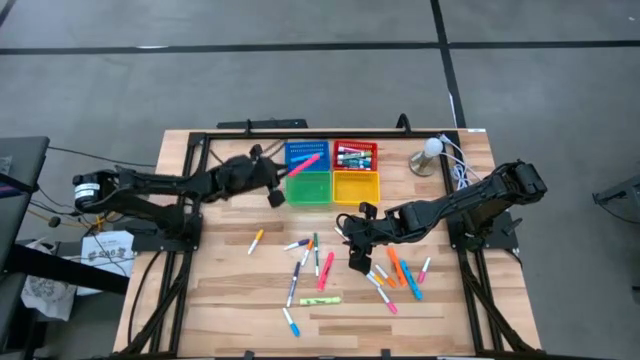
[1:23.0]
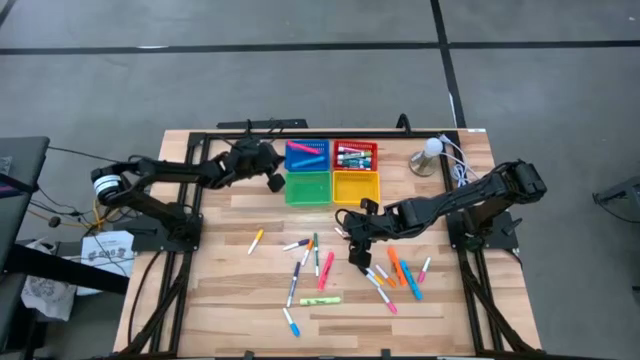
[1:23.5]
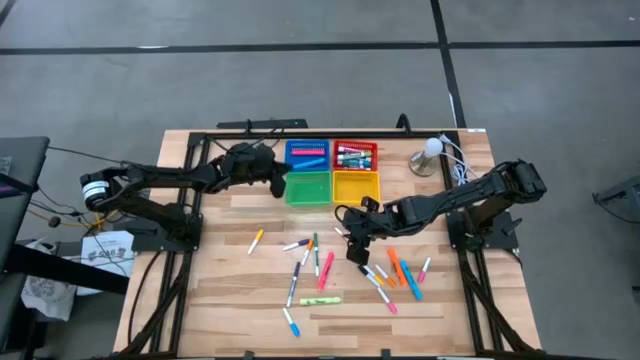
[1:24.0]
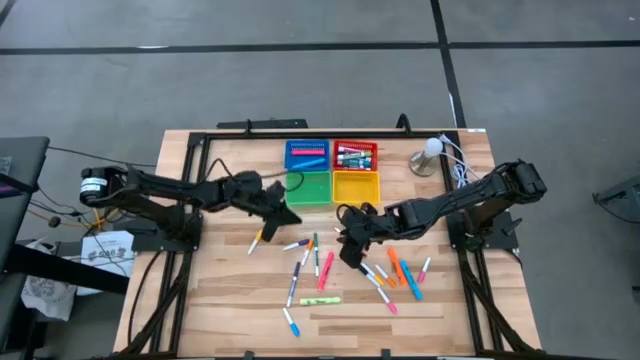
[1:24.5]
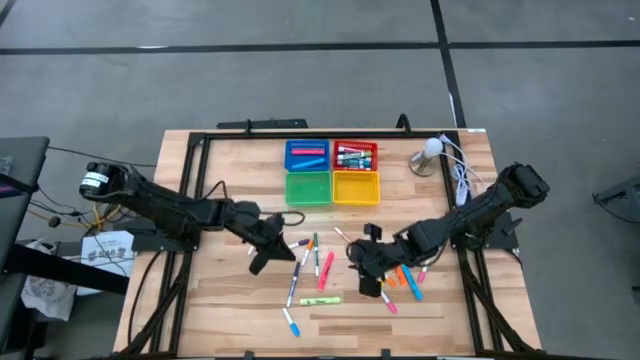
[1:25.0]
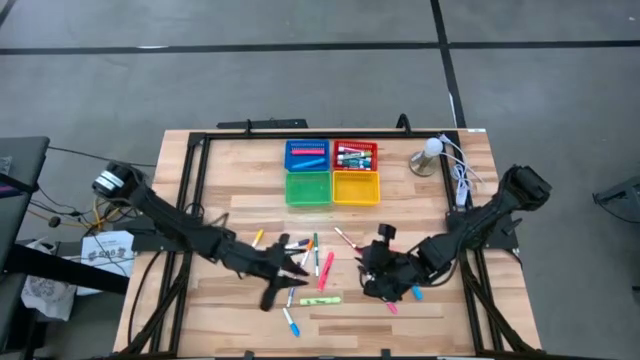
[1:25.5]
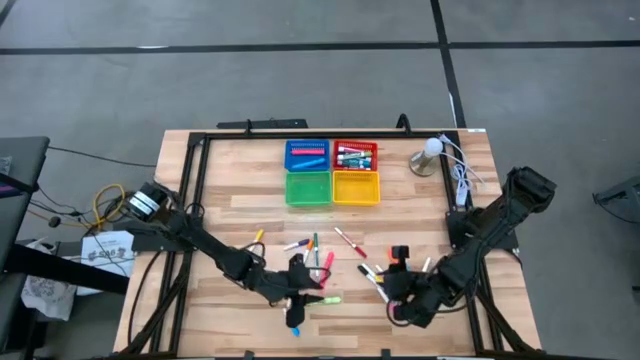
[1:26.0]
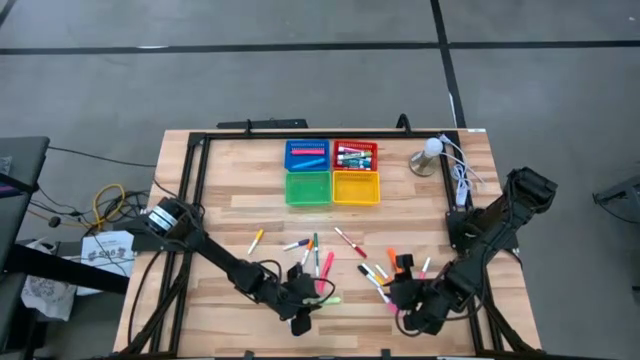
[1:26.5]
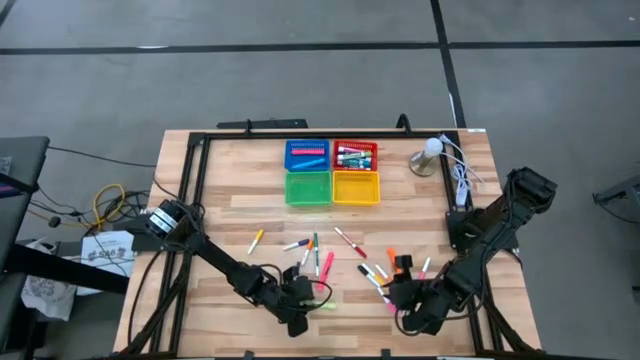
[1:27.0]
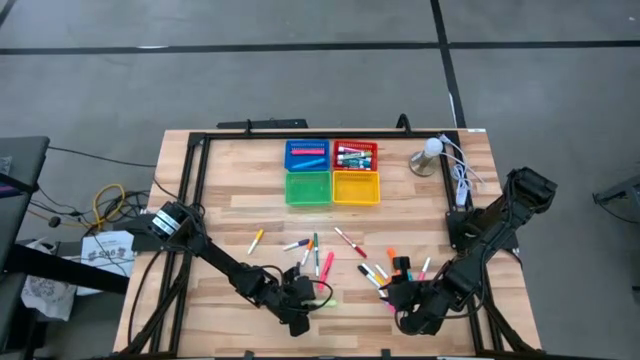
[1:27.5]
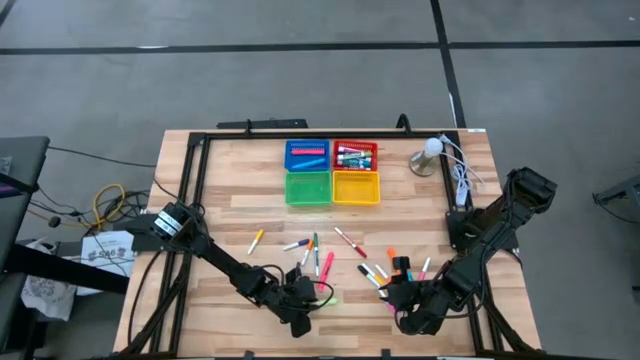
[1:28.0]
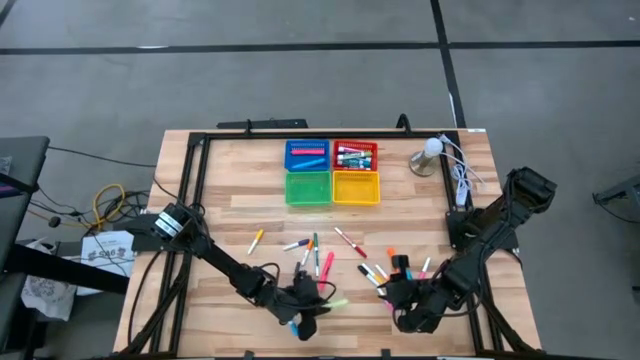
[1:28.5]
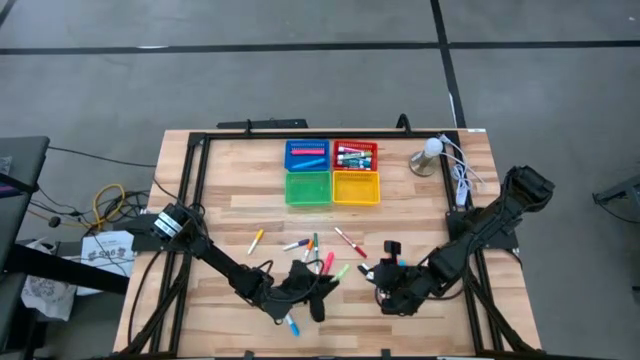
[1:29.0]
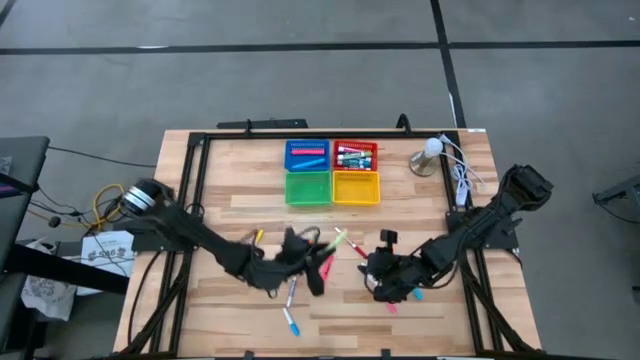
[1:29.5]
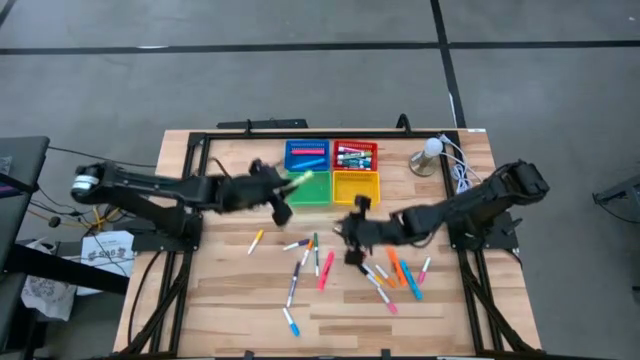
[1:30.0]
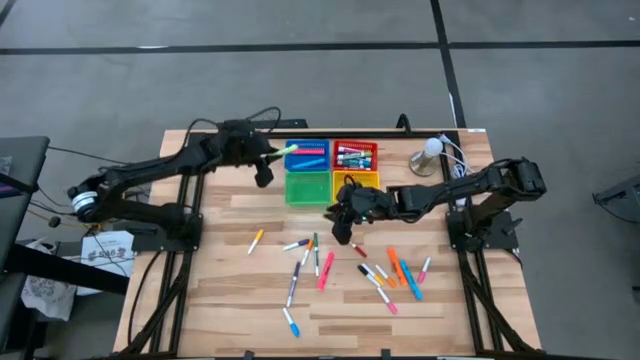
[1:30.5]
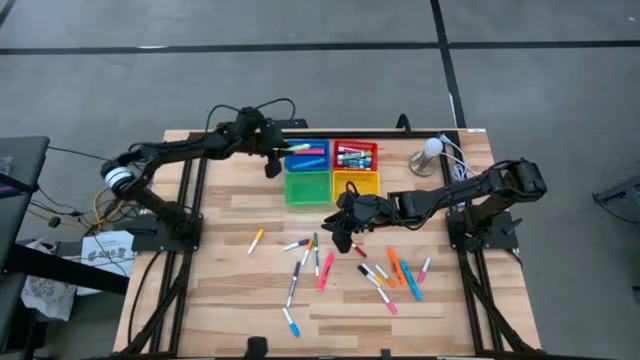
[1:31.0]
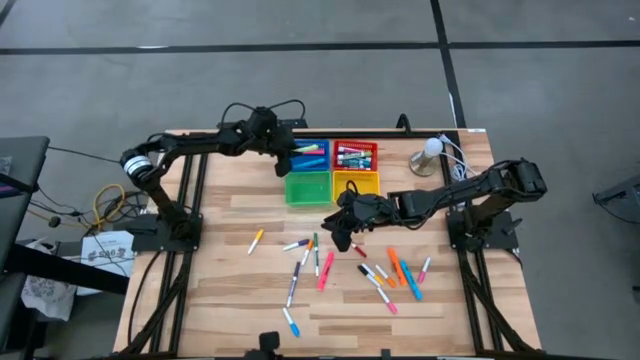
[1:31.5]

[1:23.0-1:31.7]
Task: Pick & Place Markers
Put the green highlighter into the blue bin

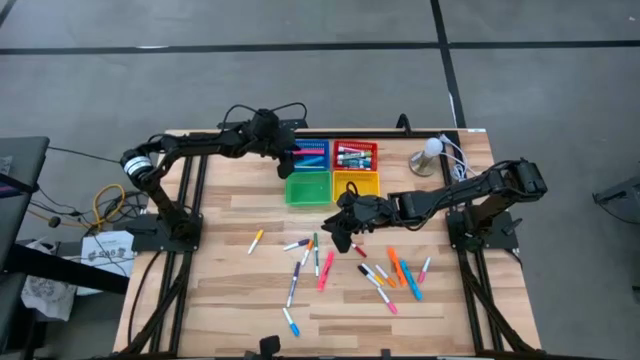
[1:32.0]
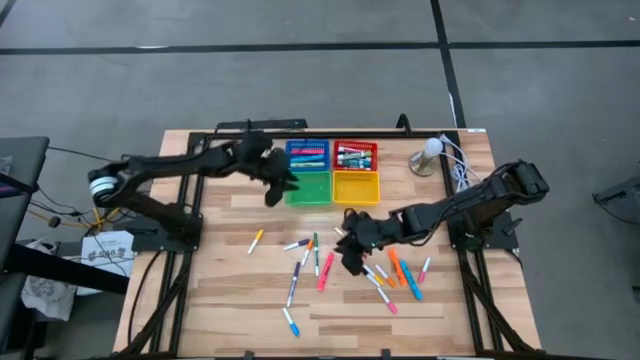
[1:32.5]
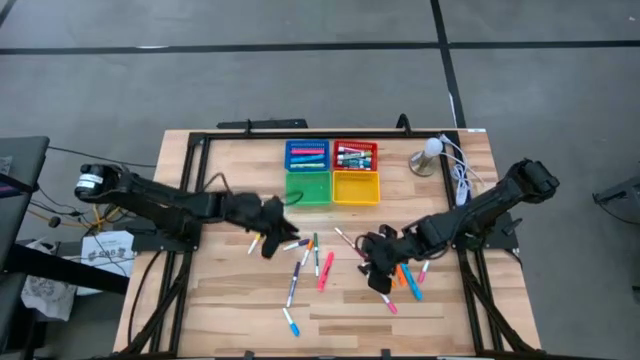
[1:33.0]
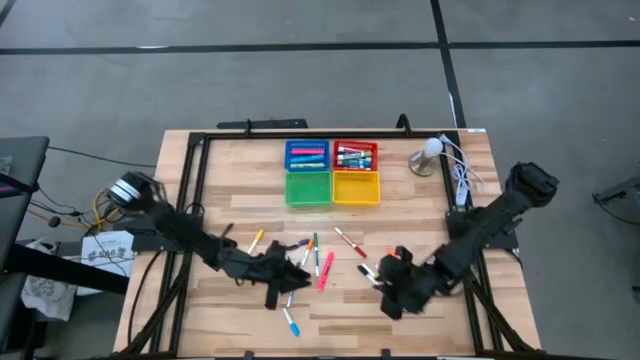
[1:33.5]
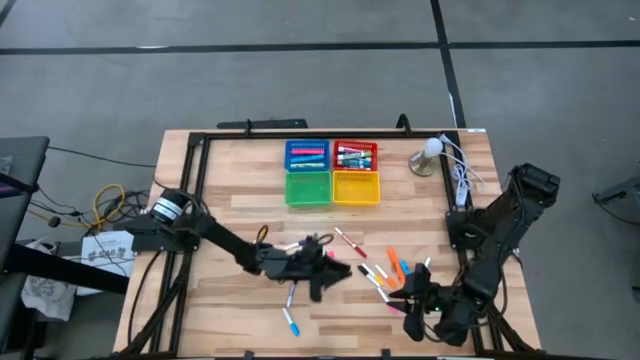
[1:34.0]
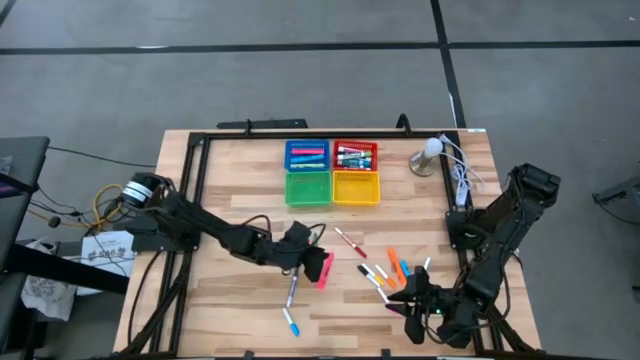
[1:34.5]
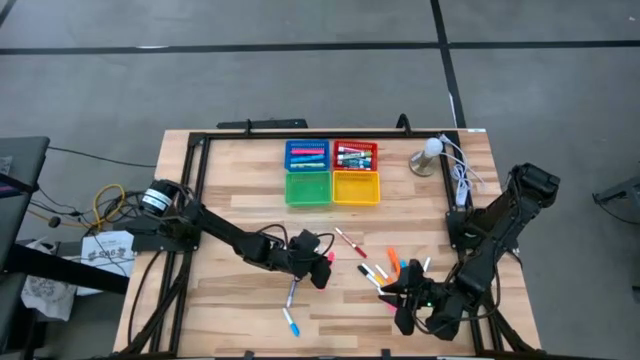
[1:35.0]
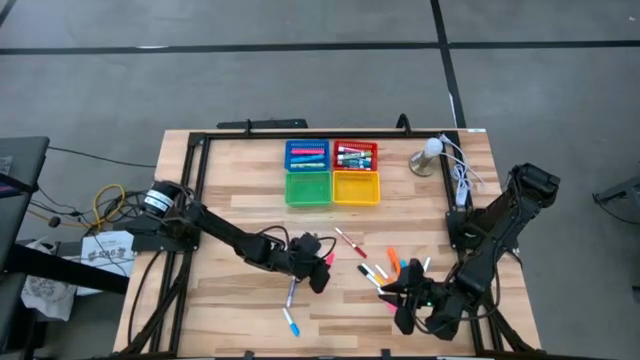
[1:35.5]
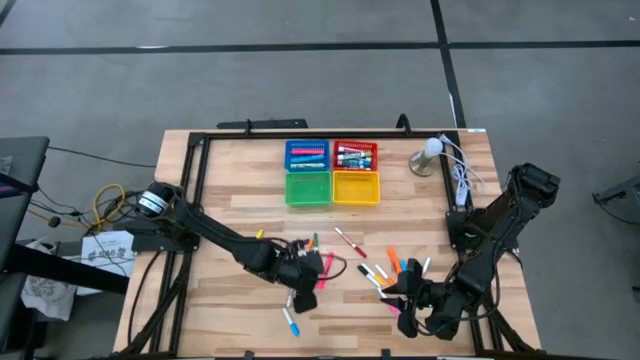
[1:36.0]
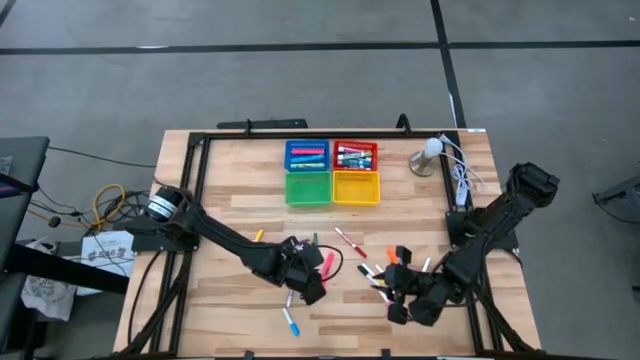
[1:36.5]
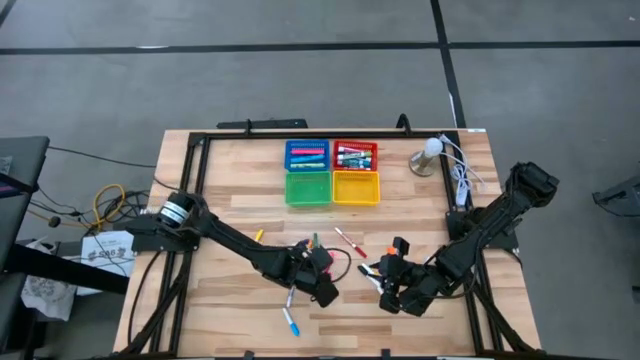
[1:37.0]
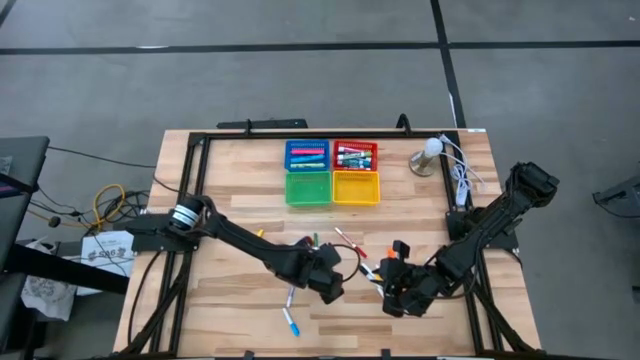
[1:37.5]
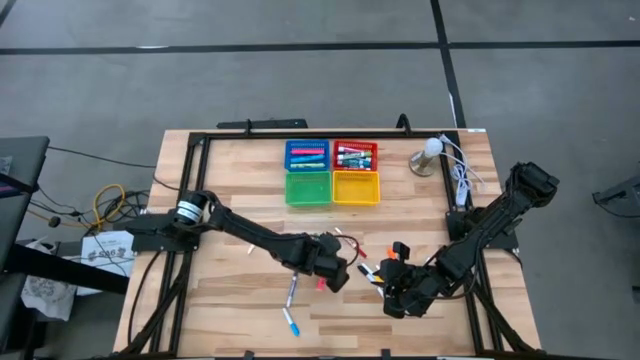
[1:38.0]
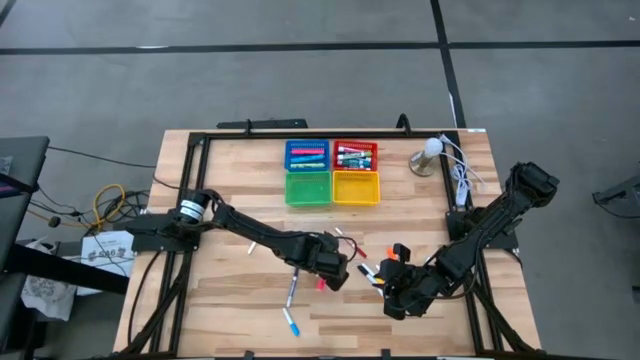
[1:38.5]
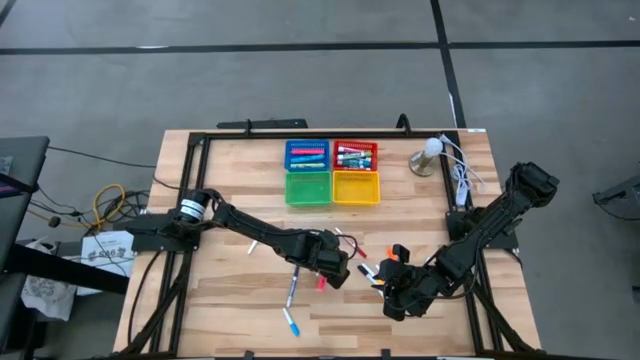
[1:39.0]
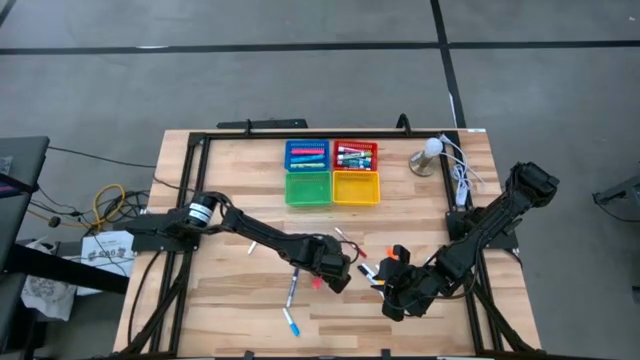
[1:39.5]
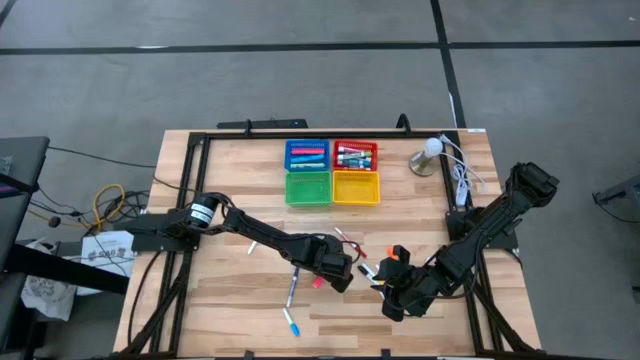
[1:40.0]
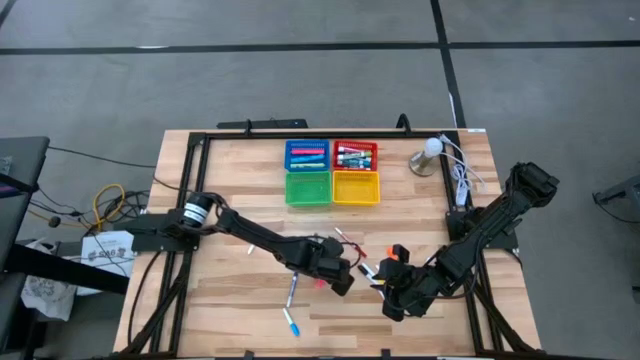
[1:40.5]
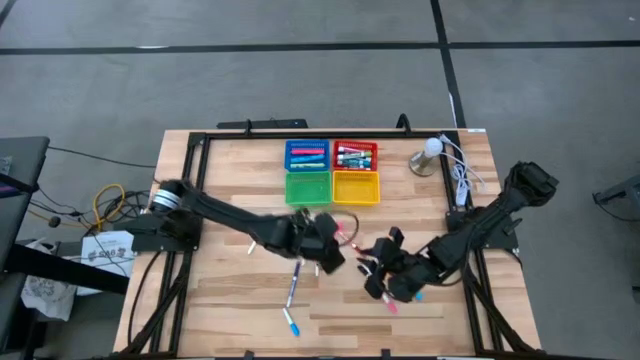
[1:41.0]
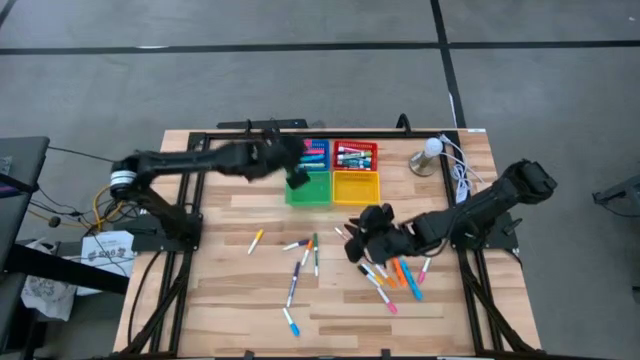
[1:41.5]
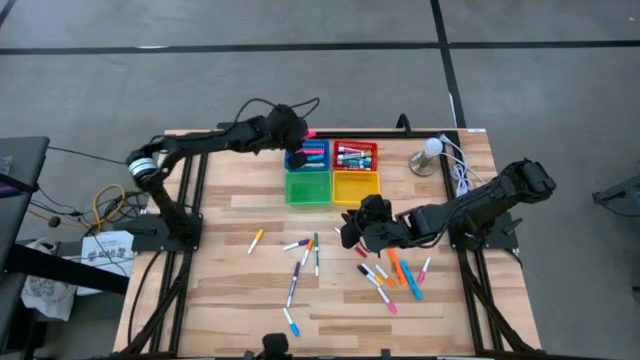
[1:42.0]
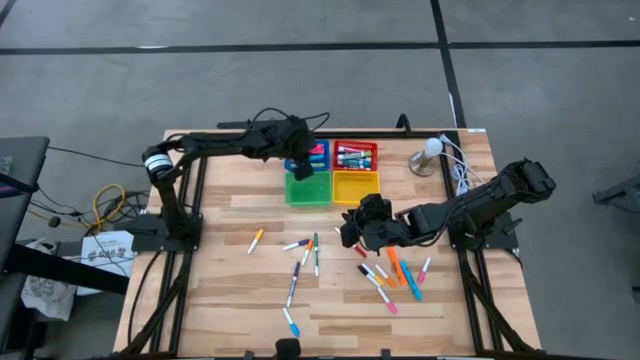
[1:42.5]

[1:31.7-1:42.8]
Put the pink highlighter into the blue bin

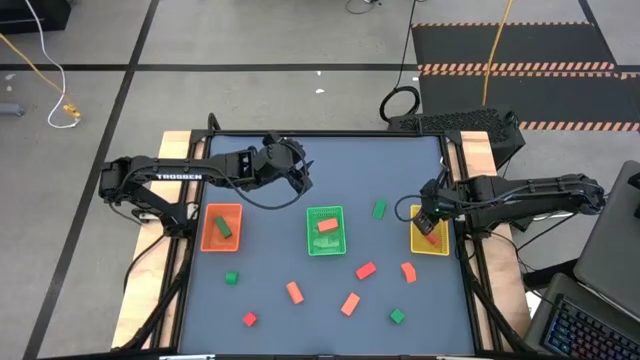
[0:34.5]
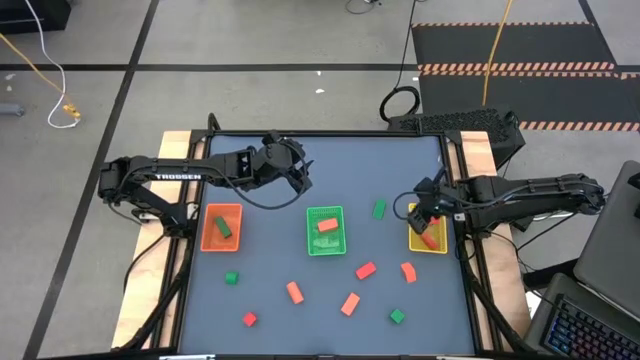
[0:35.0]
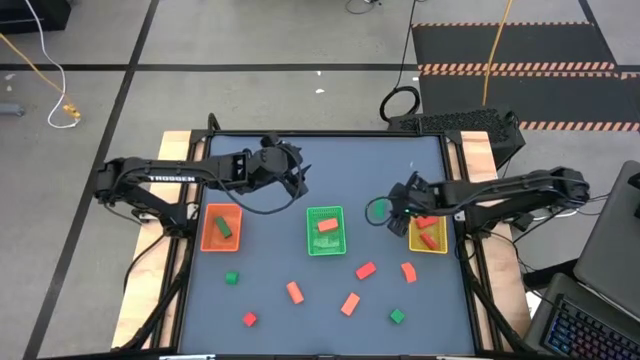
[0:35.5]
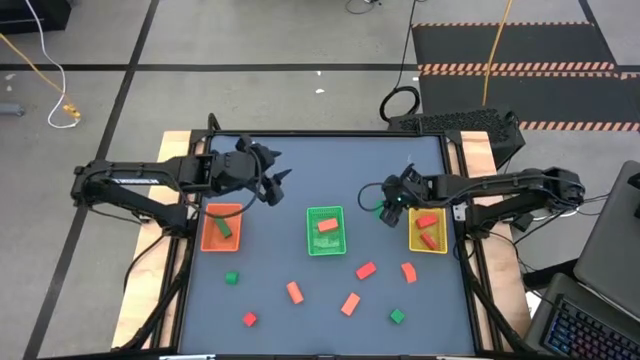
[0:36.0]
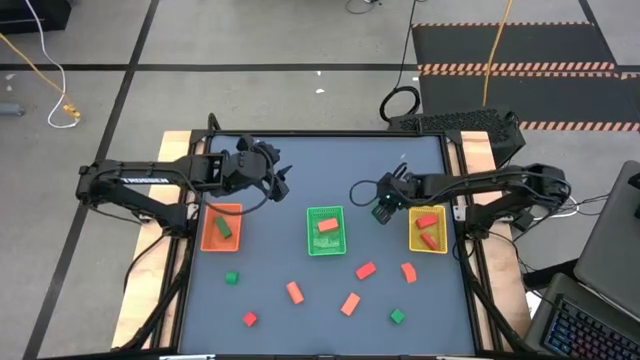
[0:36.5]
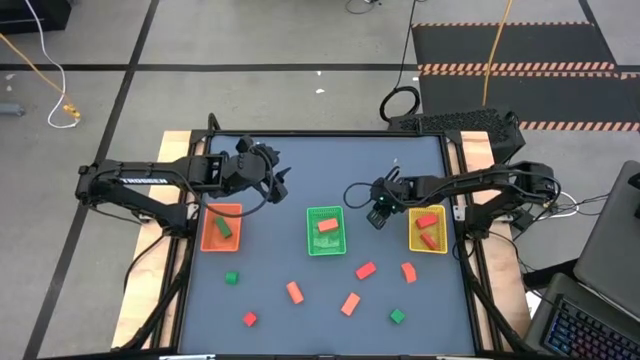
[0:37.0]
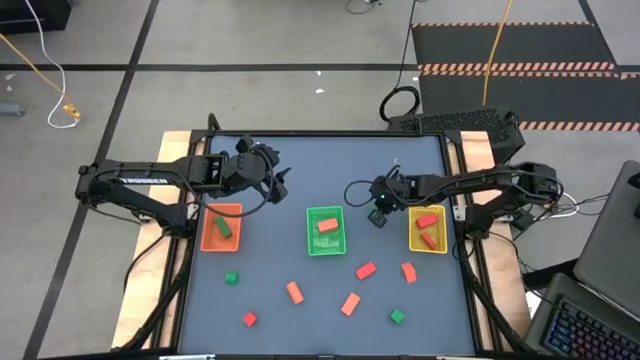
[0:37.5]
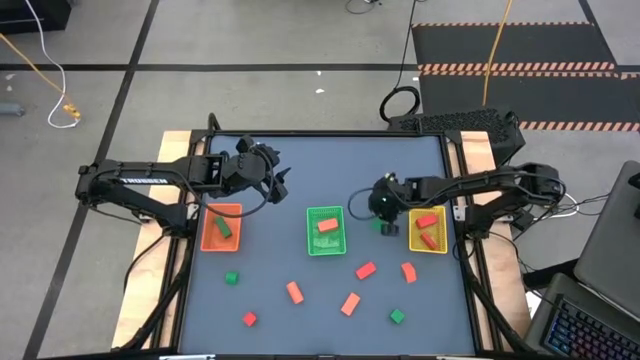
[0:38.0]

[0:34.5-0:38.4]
Task: Sort & place blocks by color
Put the green block into the orange bin
